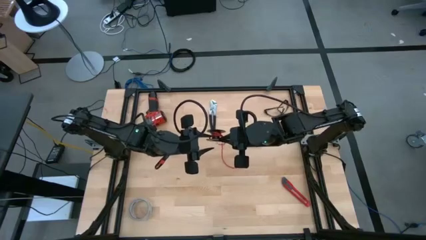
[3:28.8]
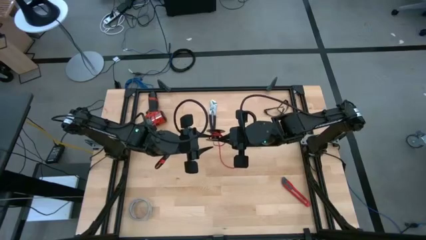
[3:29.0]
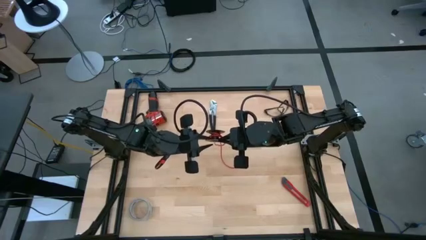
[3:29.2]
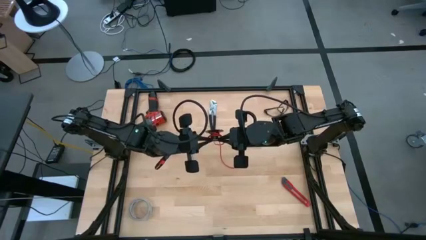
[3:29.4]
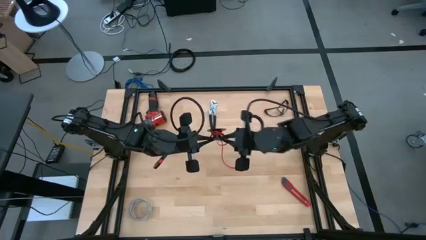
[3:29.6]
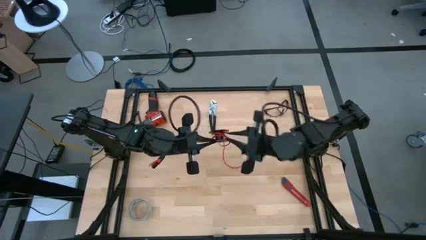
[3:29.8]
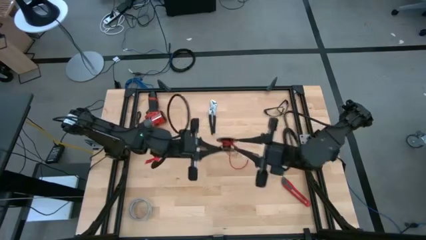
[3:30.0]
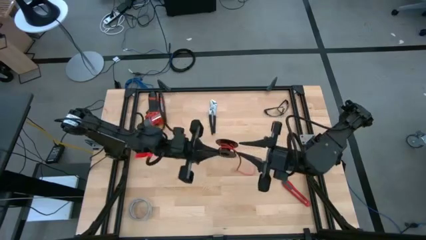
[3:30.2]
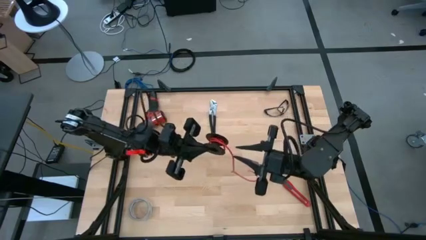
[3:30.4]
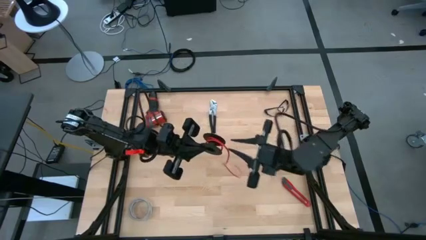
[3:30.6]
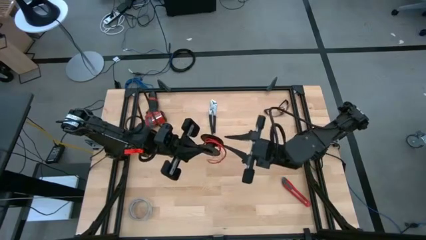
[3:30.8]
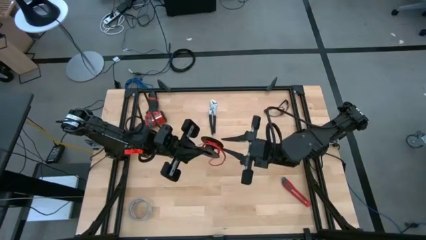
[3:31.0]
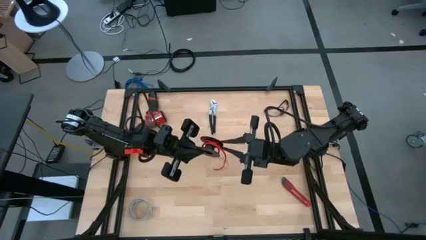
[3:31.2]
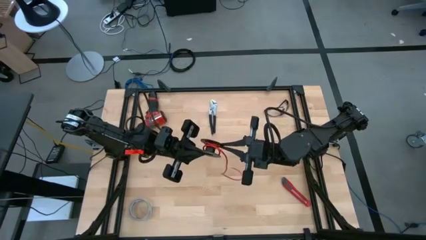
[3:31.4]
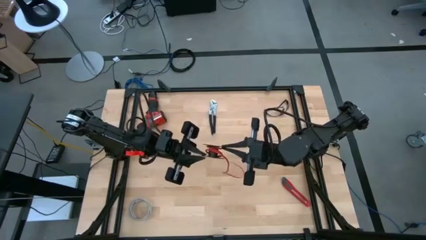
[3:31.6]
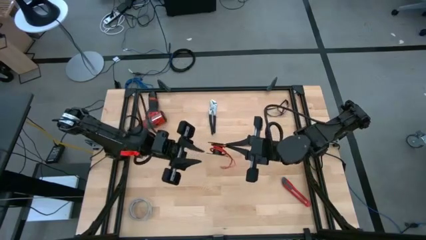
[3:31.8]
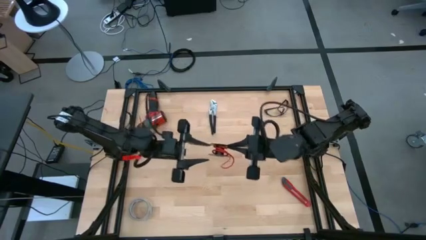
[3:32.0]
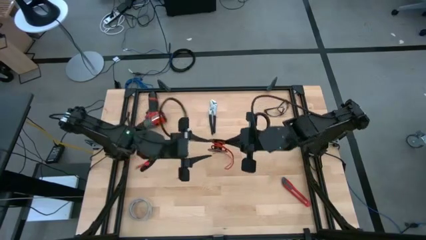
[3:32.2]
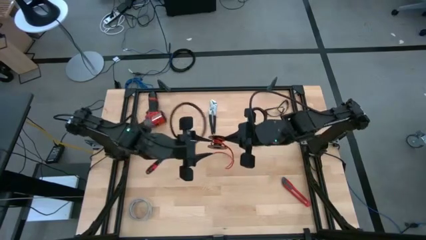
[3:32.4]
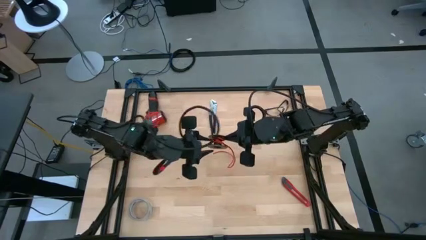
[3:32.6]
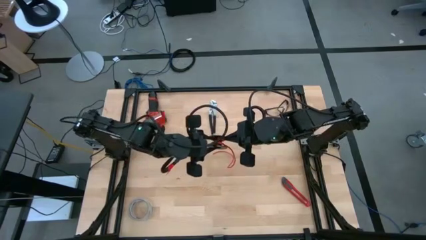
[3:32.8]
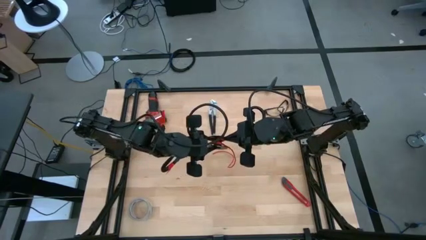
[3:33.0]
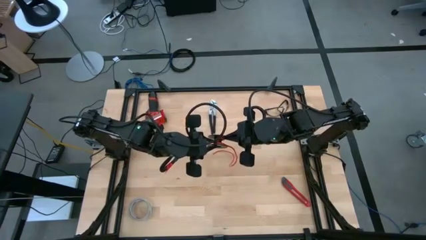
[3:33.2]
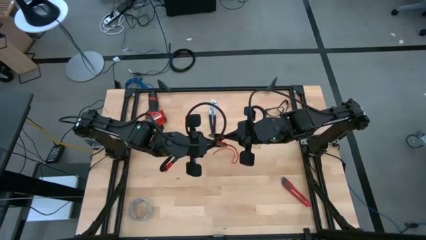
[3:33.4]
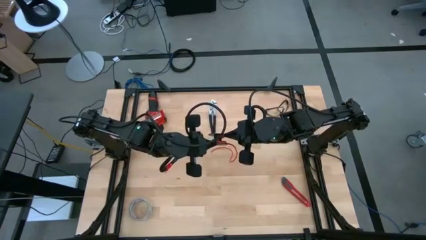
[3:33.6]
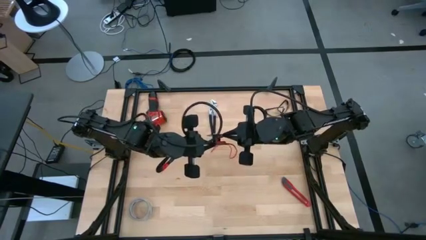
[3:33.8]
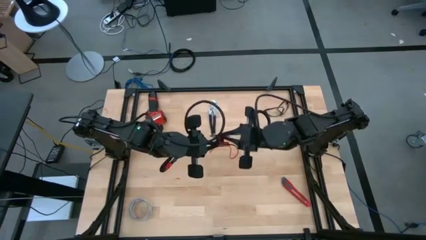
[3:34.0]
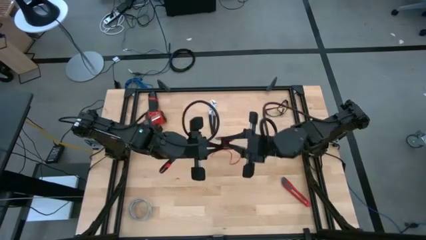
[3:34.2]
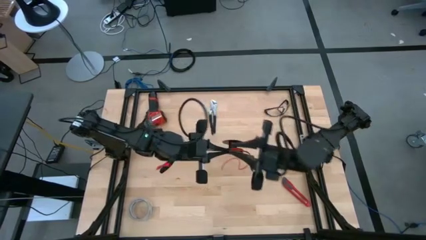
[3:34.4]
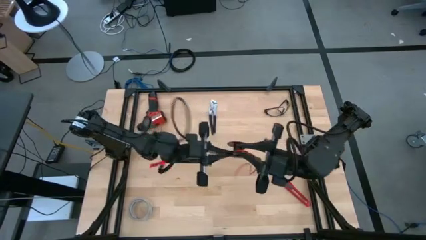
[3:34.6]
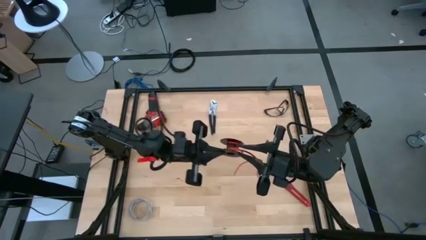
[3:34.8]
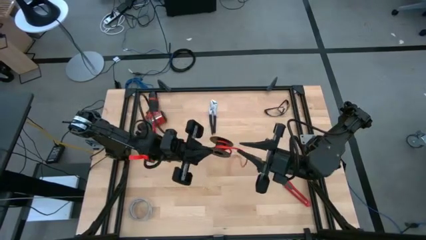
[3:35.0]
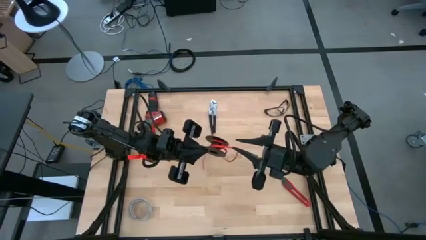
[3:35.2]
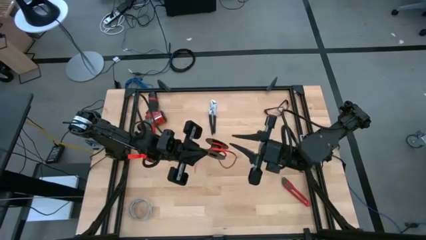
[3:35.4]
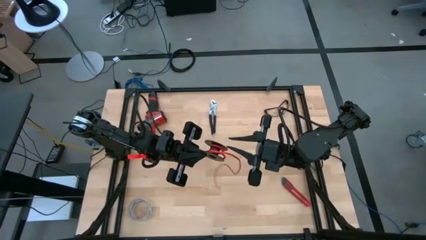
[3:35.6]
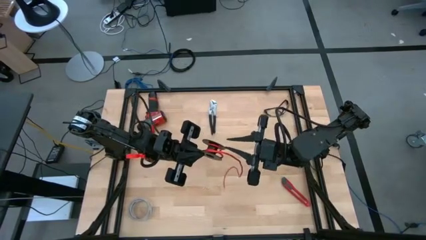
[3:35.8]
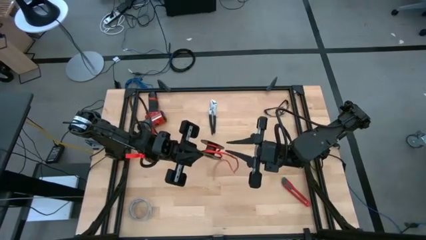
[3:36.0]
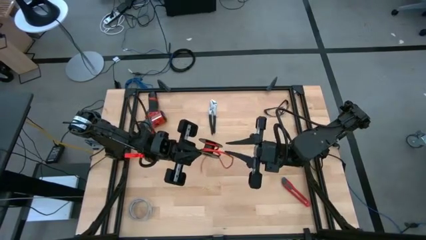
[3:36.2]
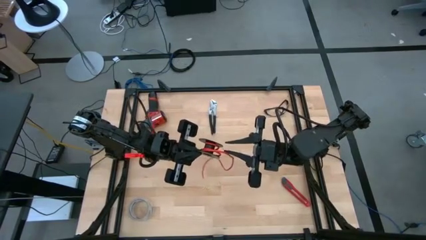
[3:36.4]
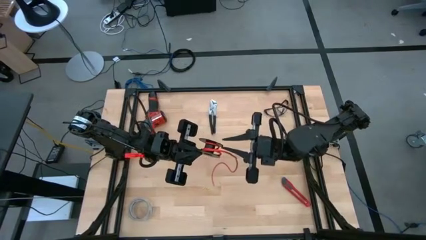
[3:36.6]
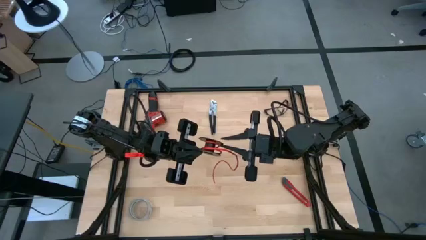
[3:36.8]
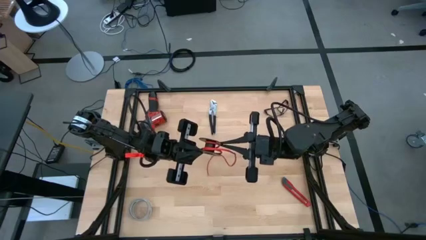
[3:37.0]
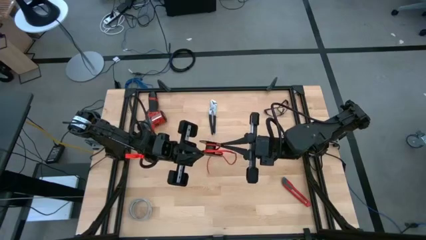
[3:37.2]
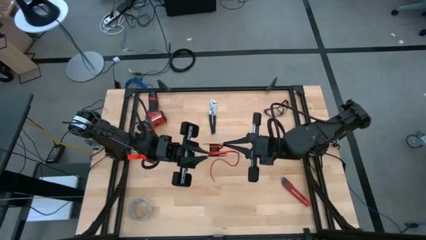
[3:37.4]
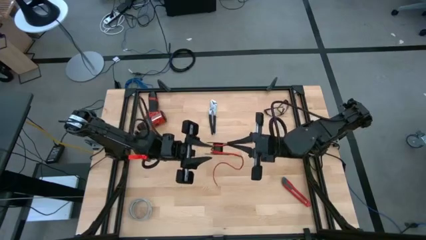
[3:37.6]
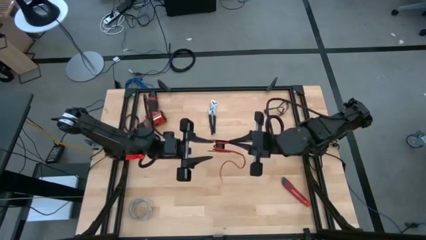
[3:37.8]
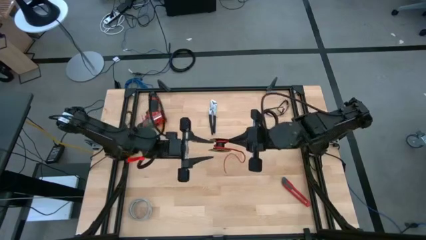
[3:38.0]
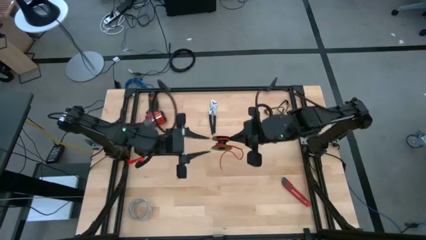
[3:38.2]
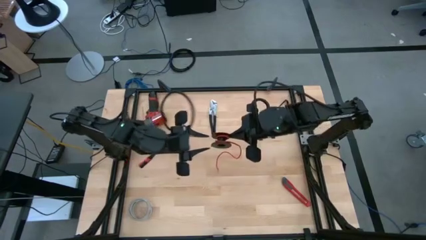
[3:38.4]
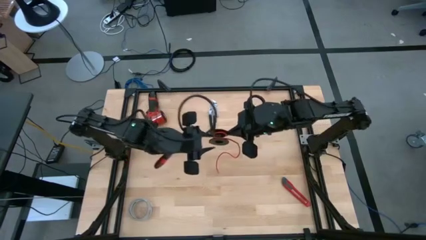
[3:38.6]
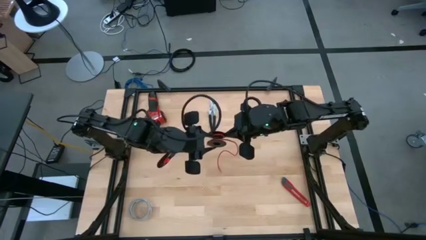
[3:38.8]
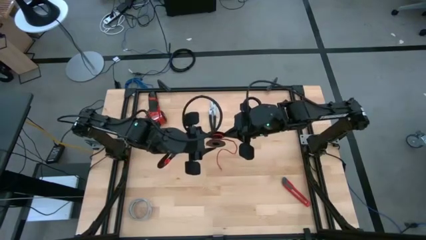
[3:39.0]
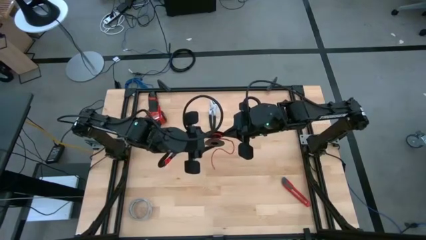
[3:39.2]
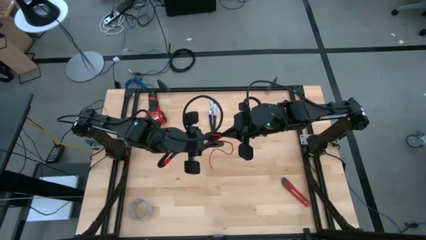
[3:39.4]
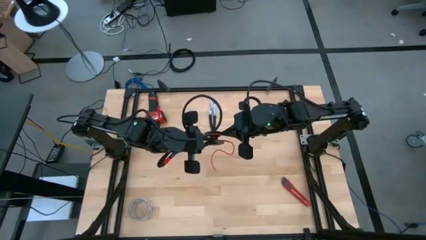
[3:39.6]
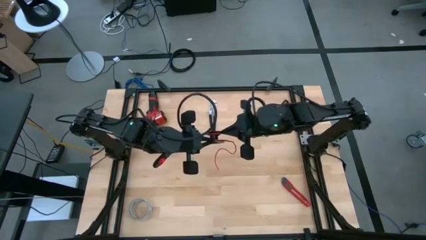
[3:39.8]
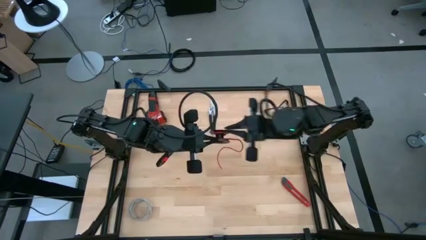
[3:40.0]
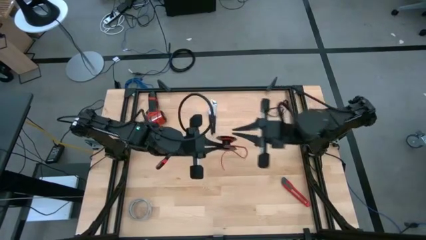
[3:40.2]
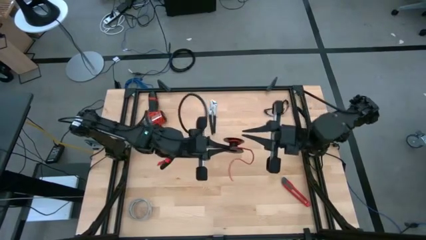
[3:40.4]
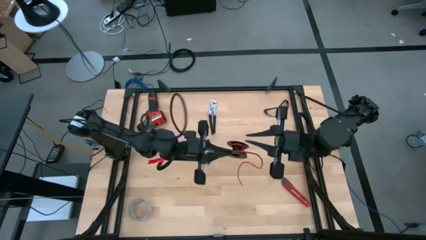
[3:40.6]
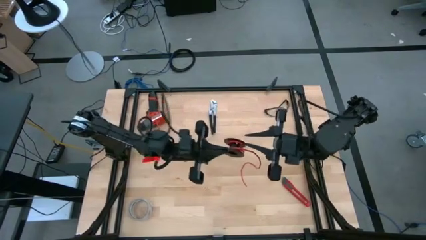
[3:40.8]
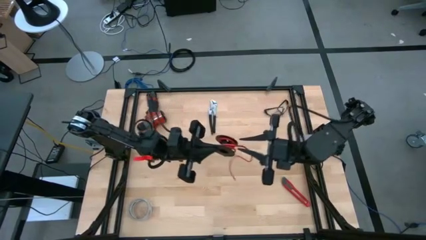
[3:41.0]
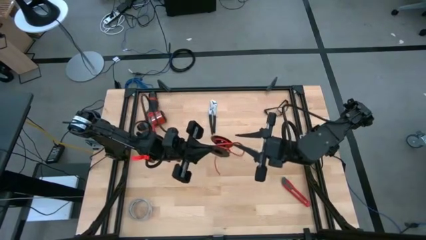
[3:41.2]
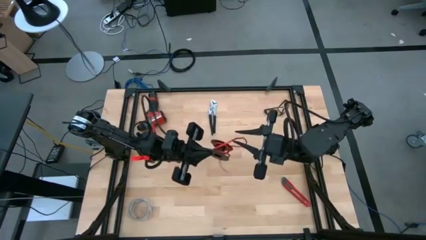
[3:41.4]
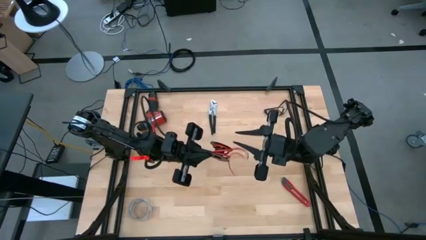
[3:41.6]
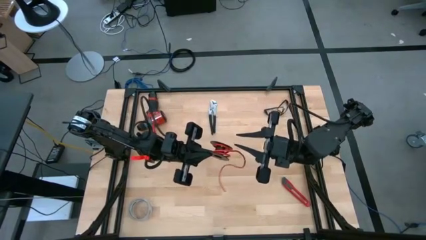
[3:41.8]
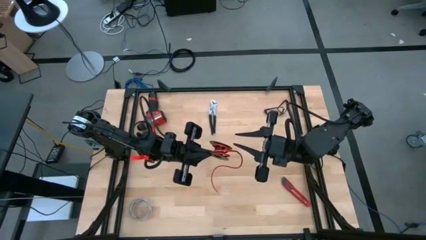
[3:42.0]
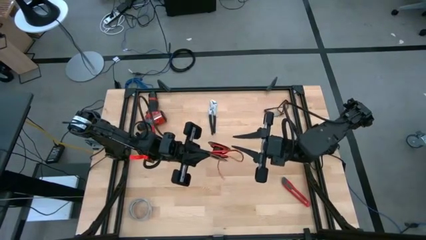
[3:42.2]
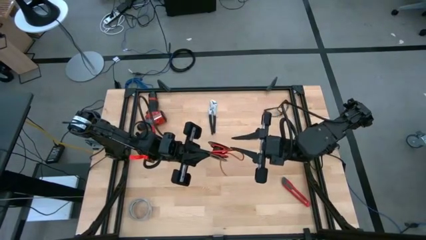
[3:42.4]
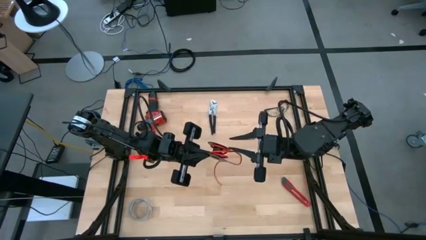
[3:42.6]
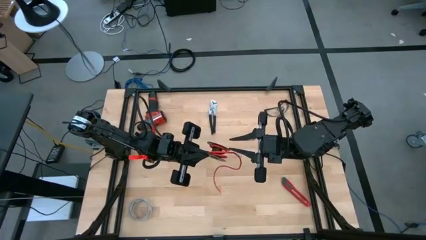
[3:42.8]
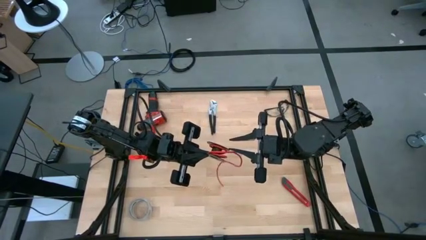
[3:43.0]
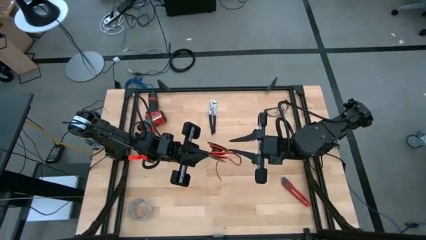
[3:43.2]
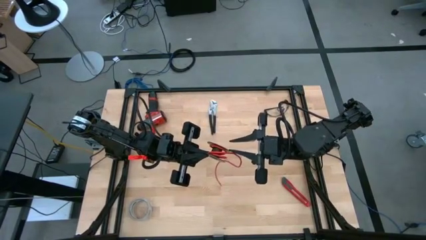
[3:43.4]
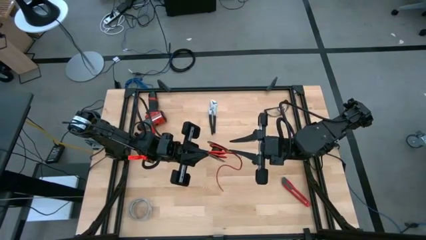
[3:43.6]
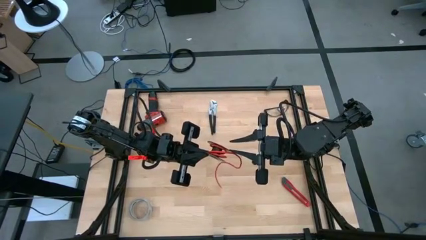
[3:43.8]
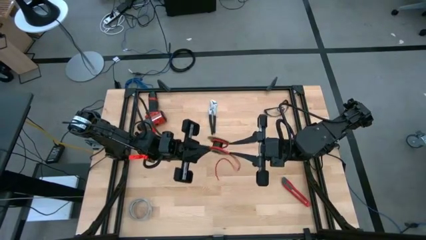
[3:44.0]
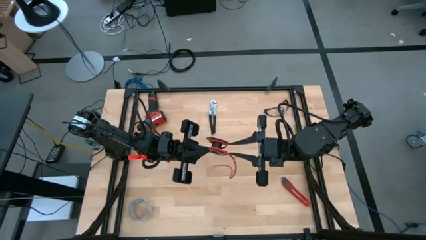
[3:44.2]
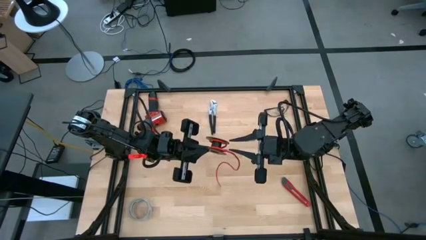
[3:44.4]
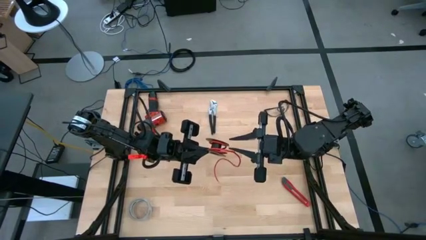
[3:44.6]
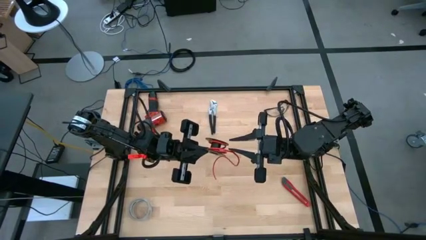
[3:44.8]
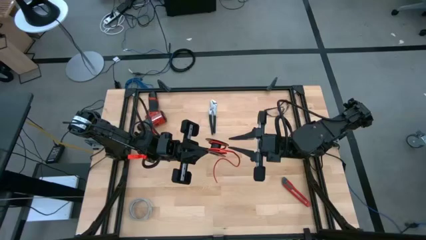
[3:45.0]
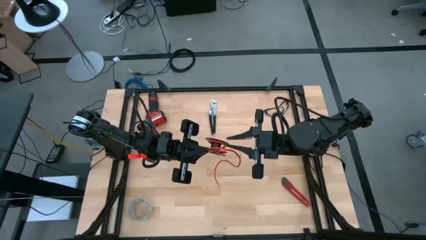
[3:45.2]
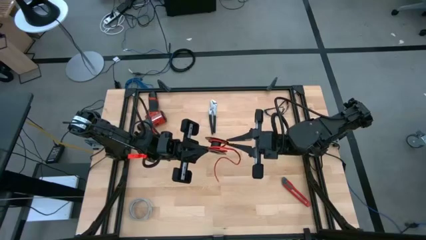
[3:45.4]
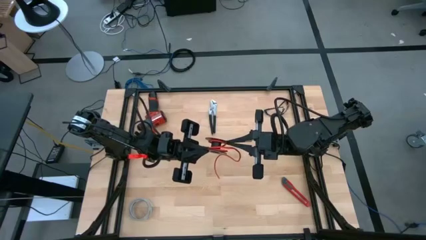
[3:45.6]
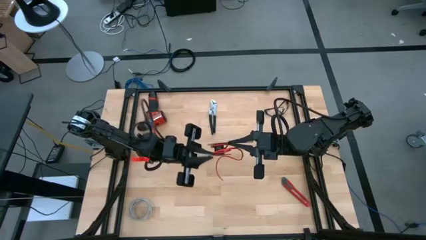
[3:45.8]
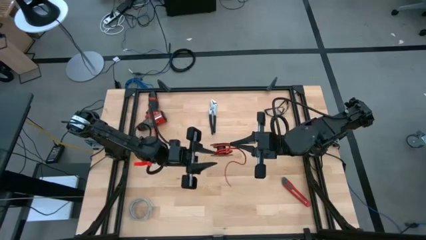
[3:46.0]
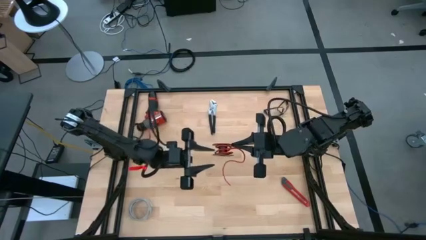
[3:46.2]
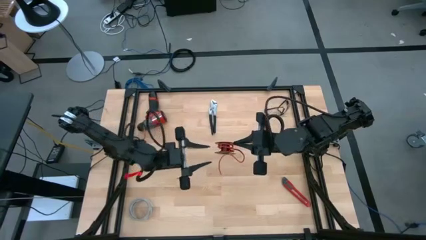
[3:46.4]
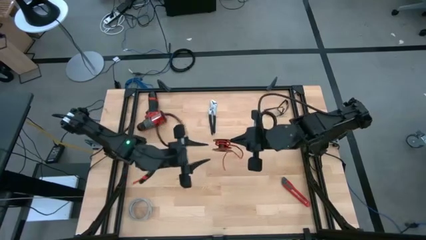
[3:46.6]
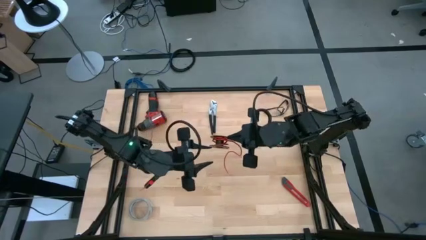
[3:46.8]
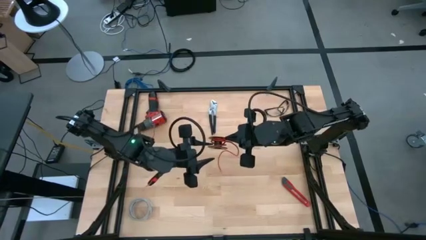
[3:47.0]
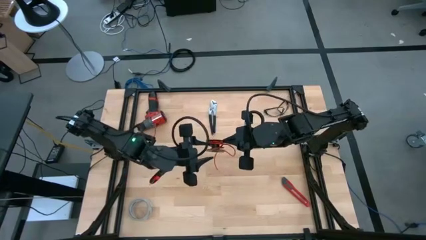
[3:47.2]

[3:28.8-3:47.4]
Task: Coil cords
Coil the red wire onto the black spool
